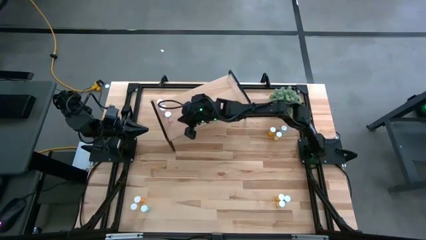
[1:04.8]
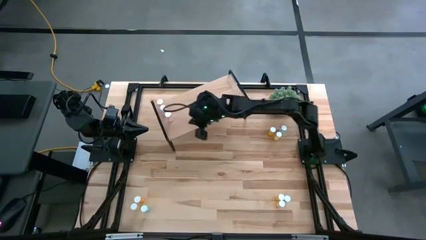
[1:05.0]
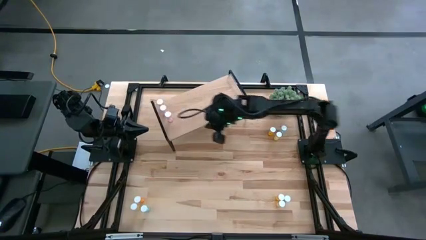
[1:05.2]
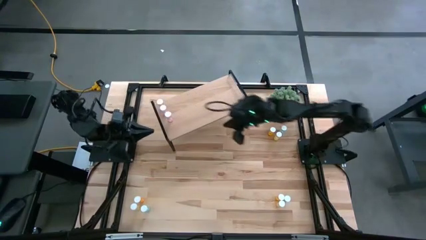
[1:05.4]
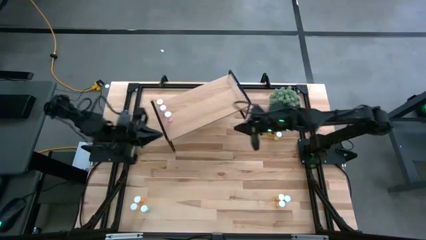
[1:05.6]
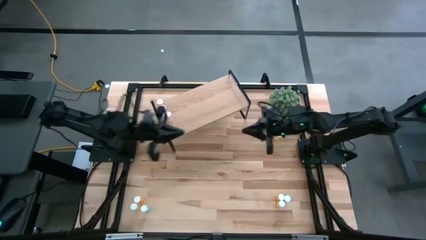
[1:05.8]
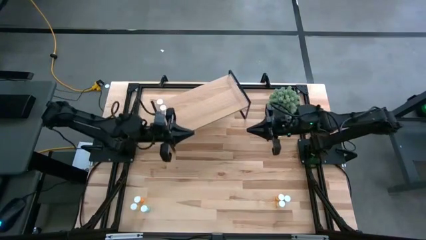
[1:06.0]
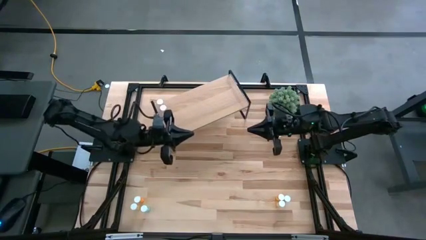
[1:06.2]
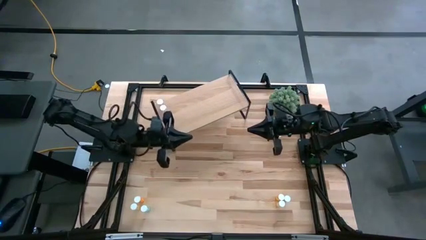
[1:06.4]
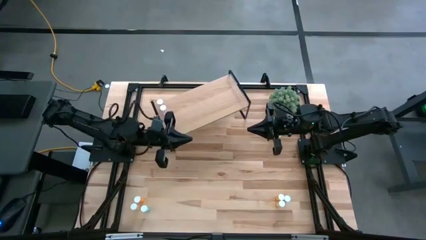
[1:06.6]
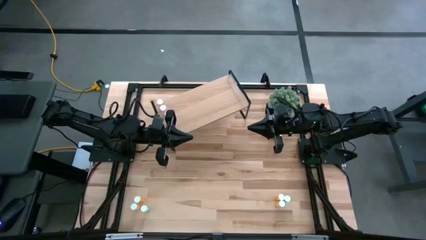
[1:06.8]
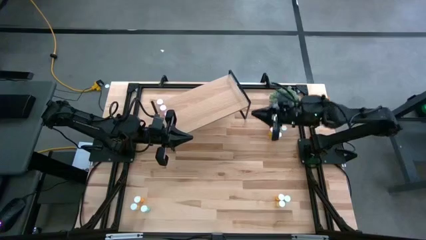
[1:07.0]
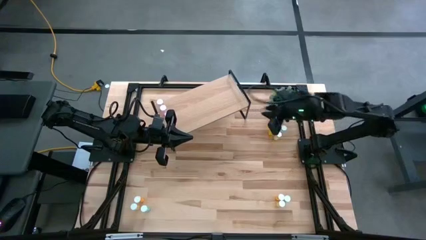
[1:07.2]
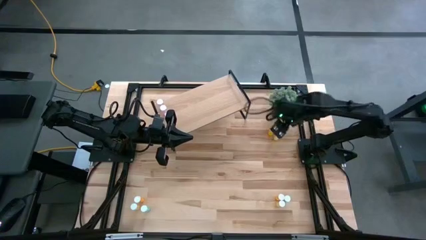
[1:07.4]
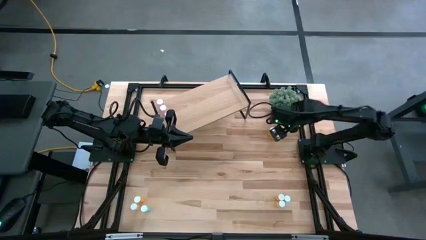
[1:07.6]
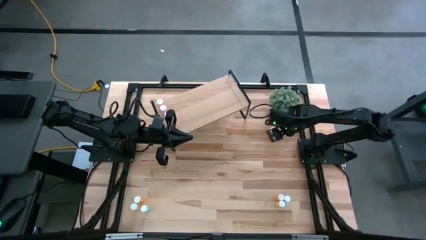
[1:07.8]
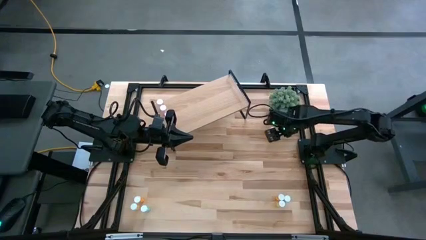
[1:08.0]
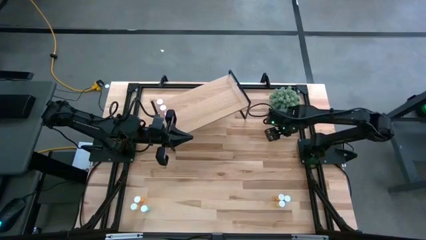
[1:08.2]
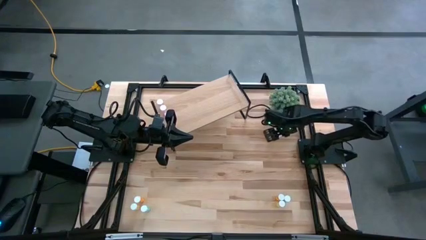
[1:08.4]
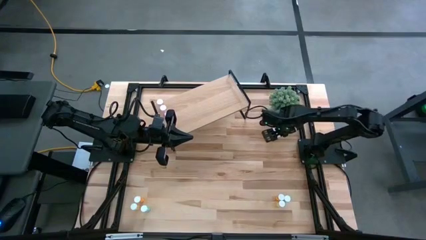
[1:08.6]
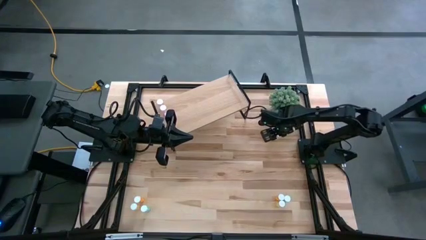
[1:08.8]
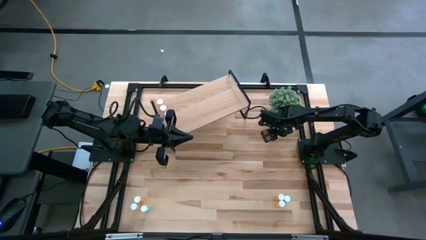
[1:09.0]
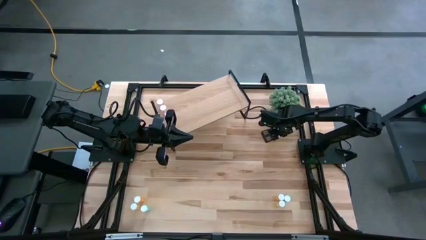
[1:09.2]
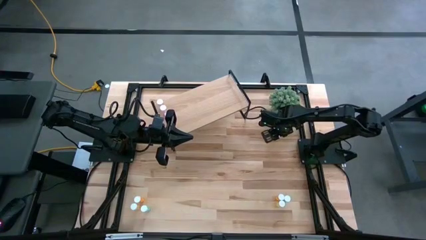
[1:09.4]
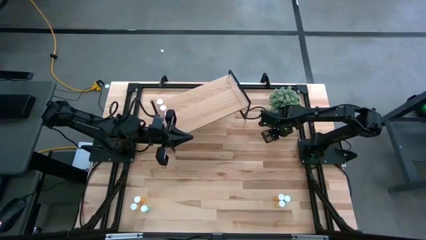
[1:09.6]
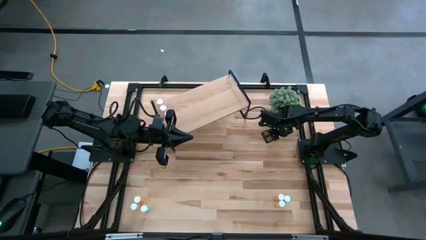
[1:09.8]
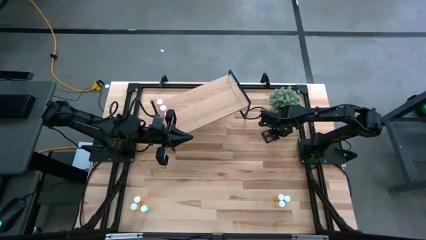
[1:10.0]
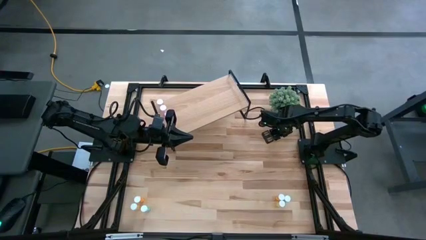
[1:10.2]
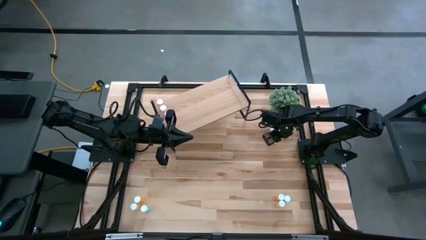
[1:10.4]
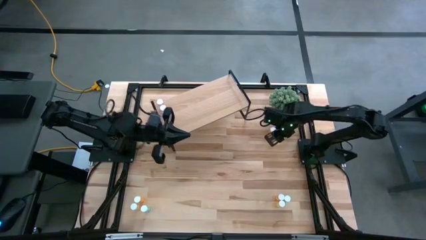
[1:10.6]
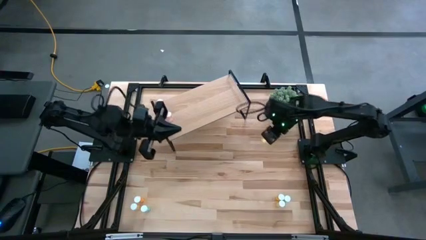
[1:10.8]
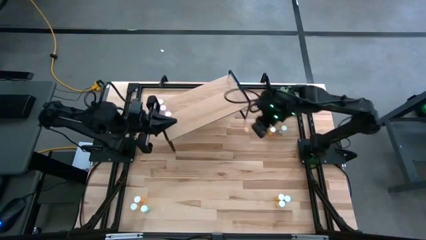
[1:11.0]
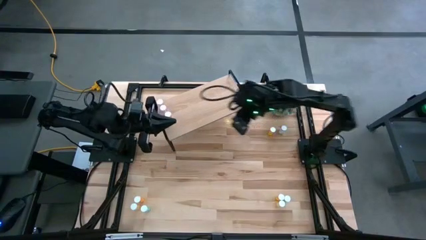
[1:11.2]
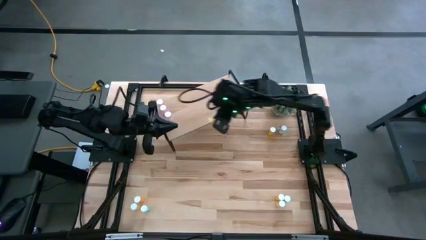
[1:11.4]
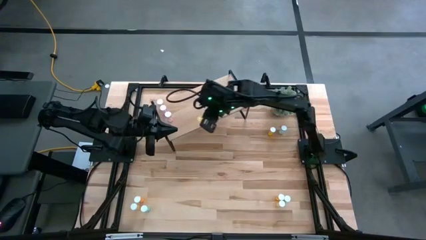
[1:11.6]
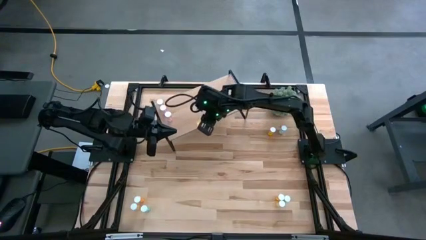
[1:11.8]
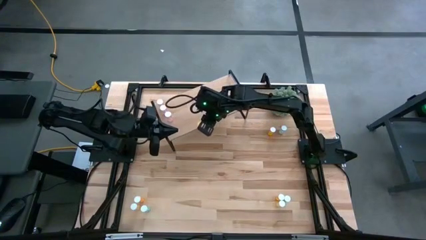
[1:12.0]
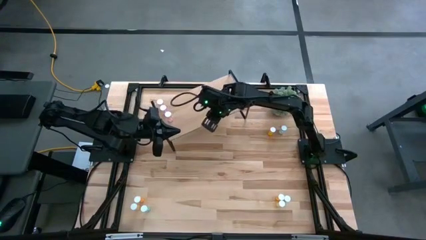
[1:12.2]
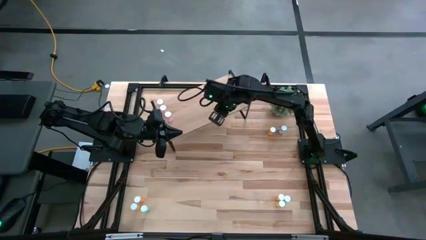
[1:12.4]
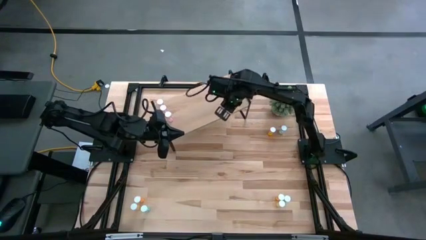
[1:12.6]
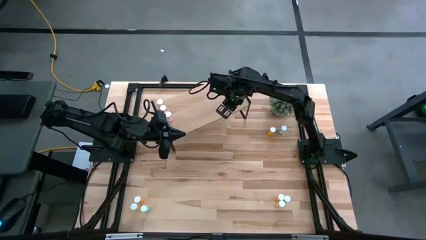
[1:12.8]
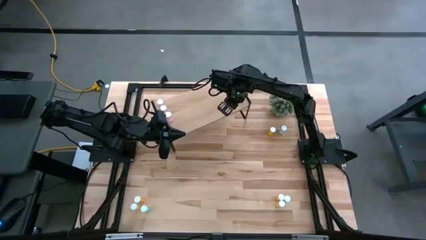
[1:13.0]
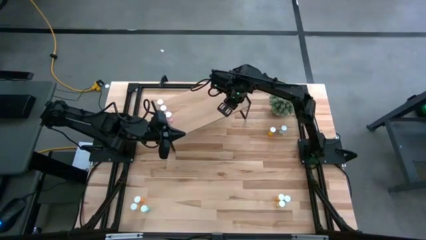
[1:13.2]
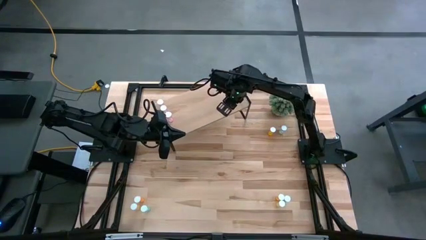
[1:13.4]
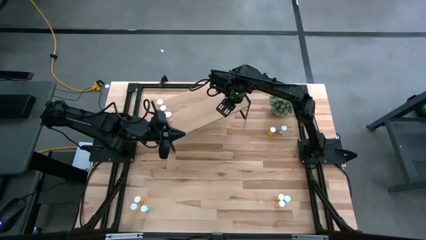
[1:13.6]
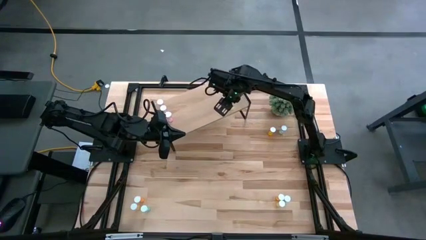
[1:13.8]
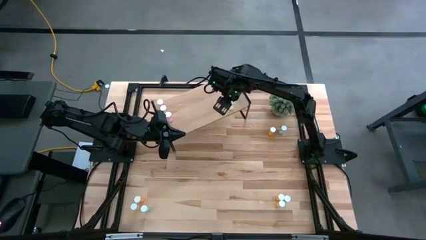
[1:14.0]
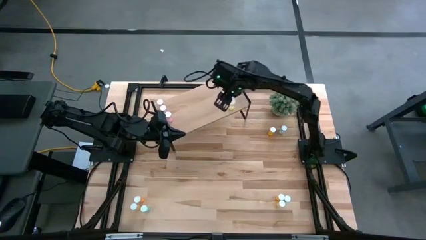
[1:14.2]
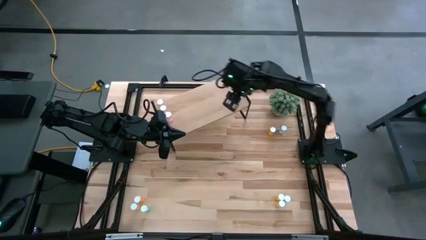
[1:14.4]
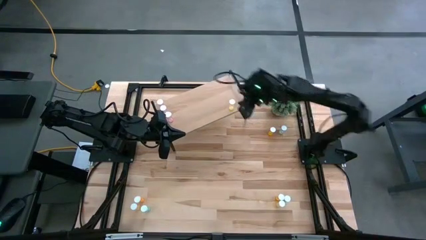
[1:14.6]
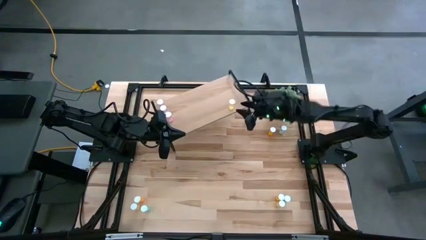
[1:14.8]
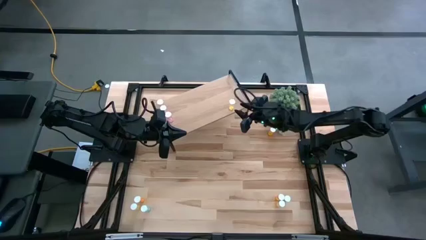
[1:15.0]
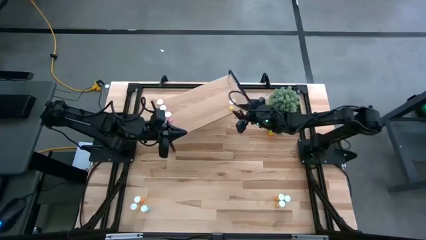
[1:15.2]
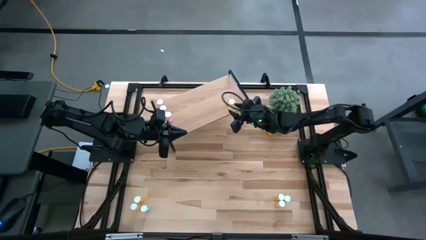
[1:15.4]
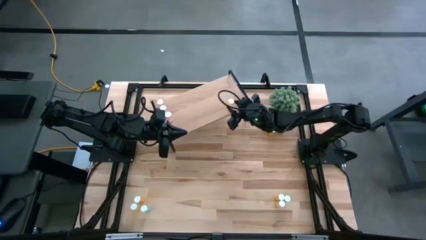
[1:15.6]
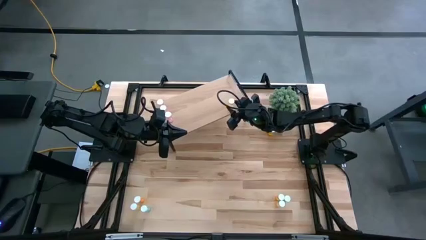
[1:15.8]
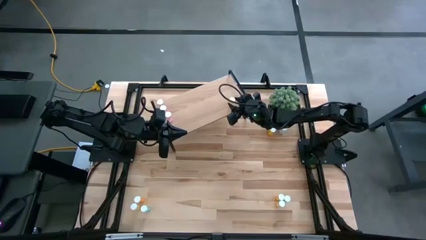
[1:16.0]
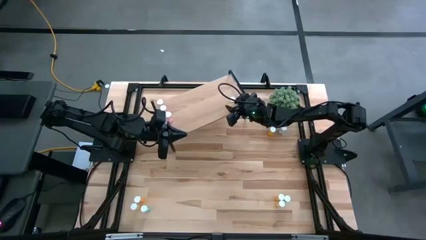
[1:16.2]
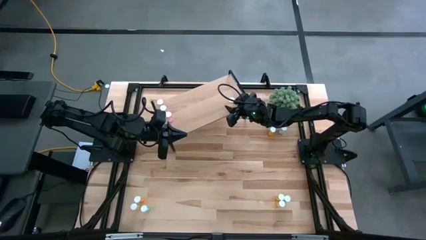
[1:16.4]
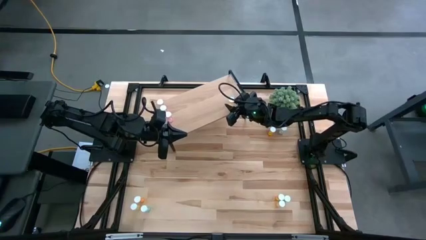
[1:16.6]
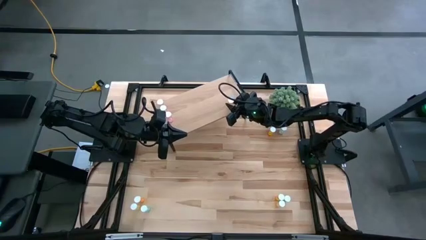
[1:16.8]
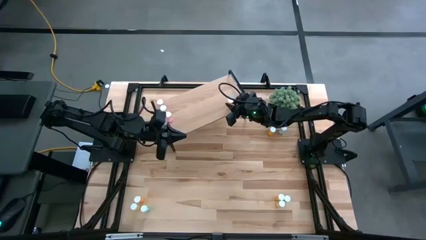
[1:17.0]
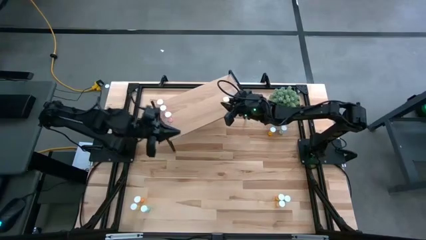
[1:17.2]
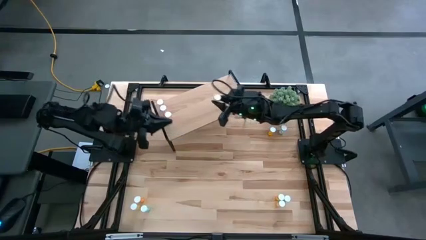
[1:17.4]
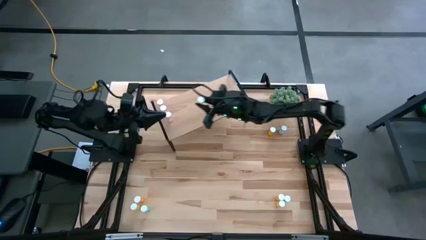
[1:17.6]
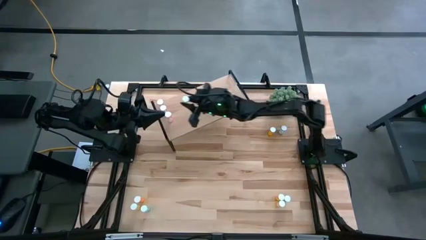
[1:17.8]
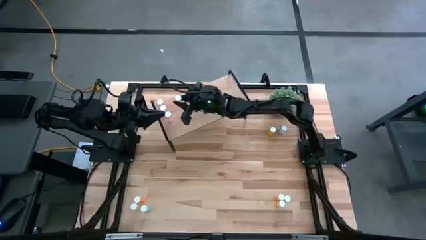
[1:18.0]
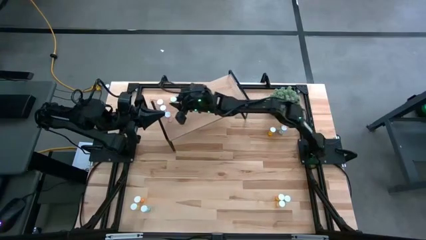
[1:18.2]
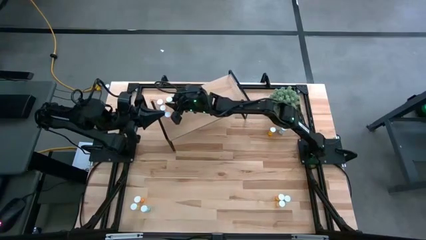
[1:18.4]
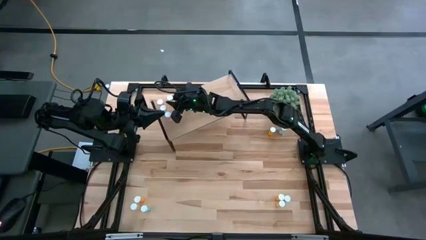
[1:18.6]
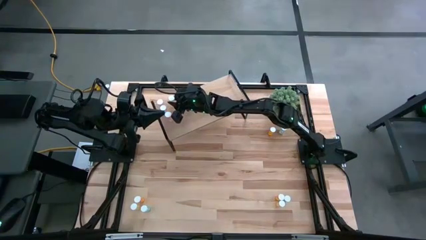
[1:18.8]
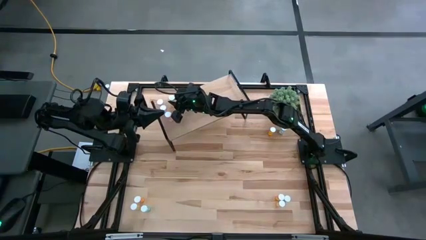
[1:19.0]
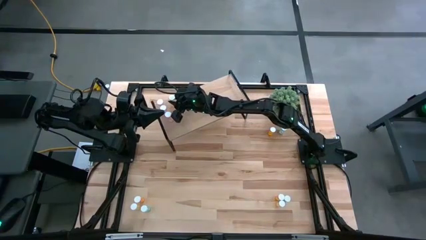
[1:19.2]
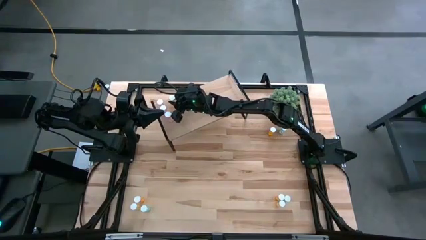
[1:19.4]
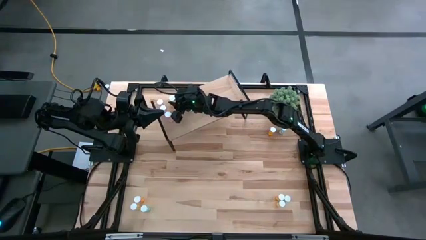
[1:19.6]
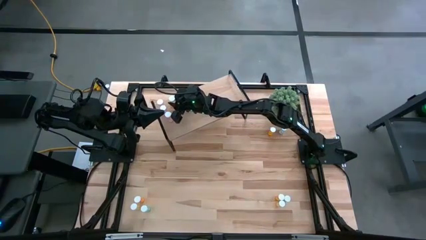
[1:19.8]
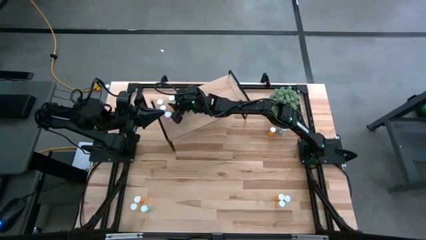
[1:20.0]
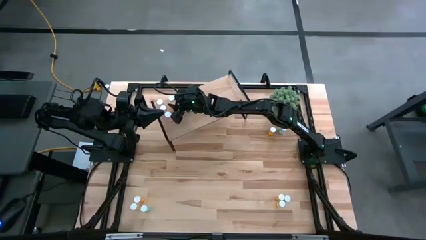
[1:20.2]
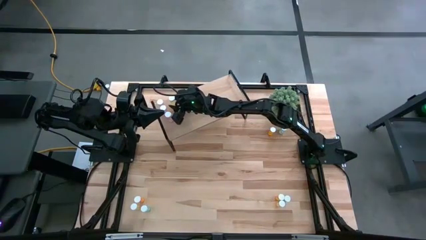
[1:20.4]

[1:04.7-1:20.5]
Task: Pick and place medicine bottles onto shelf by color
Put the top right yellow pill bottle on the shelf
